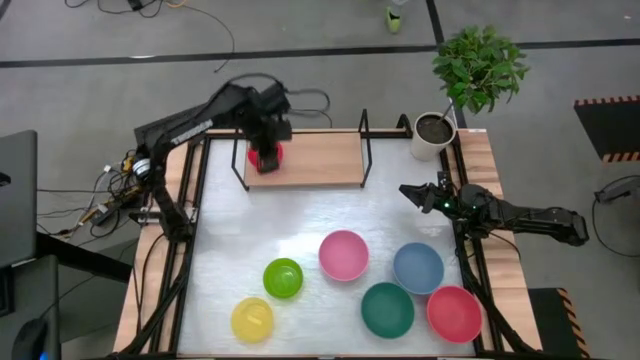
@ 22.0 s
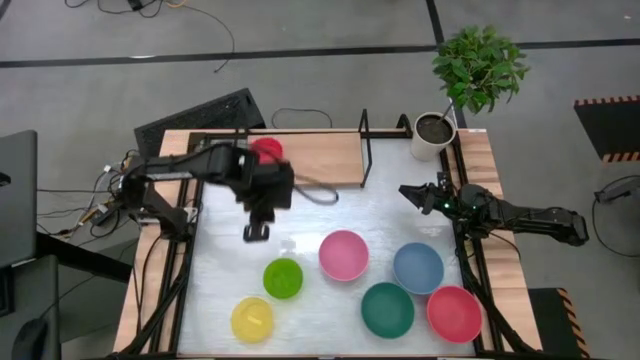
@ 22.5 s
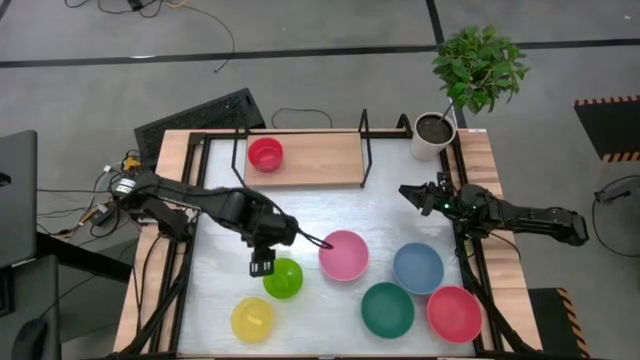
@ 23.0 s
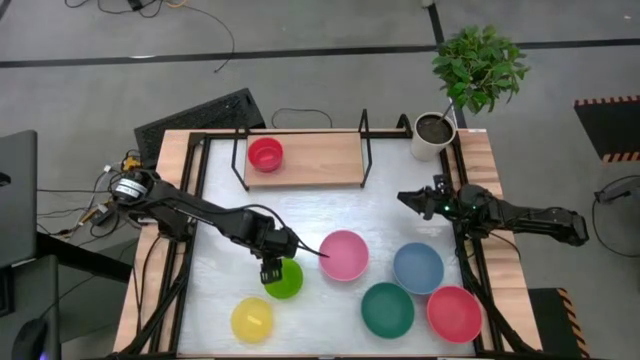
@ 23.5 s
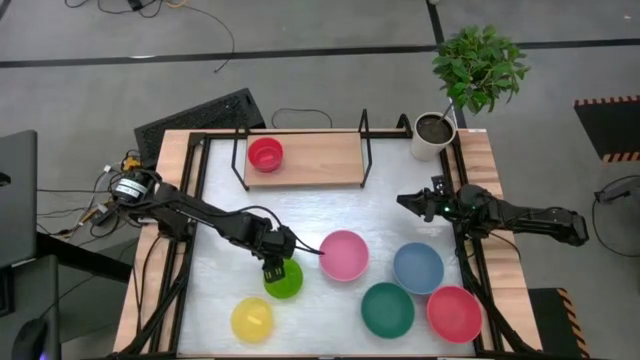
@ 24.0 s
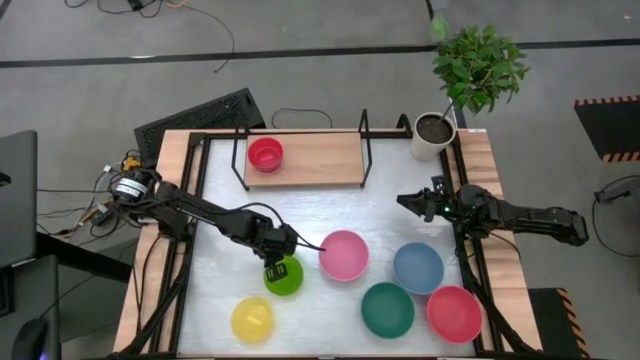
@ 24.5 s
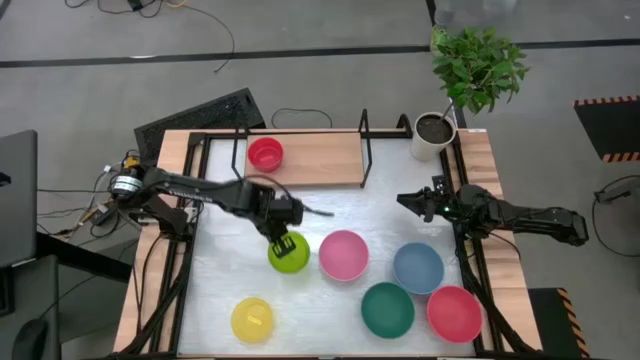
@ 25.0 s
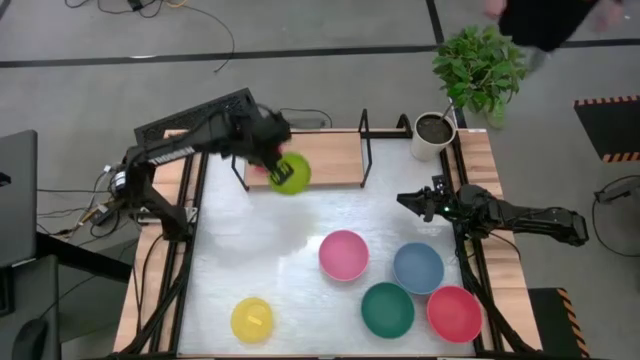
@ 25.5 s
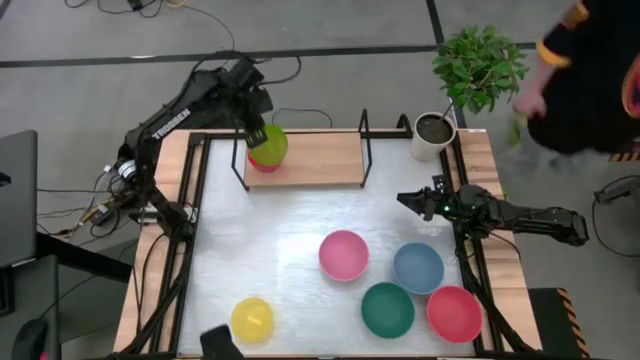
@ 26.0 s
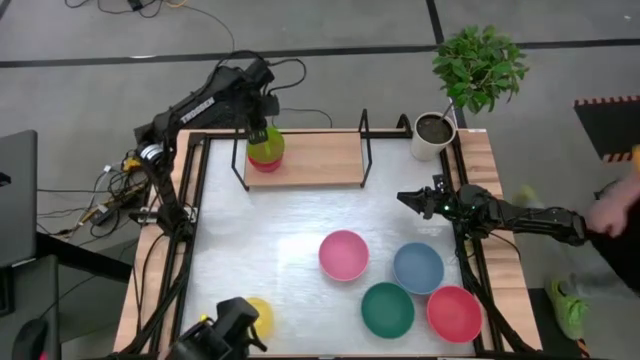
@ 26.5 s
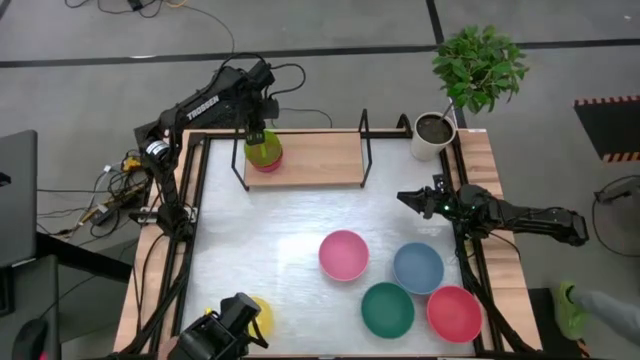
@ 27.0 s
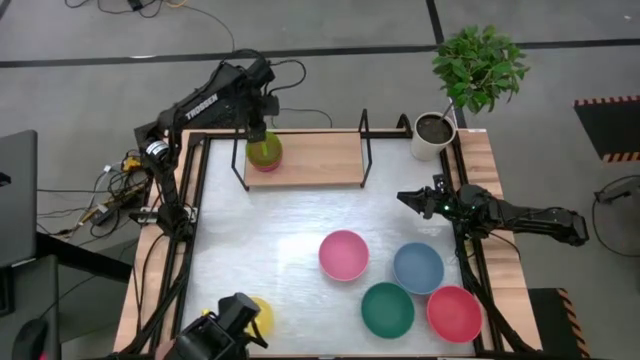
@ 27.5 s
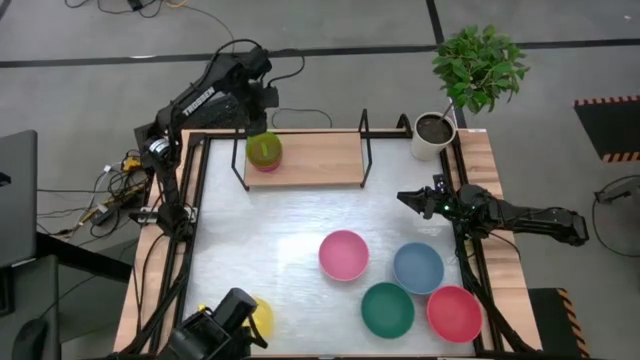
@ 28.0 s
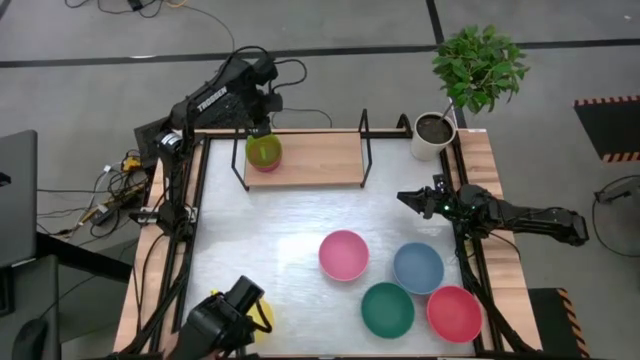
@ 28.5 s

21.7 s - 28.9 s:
Task: Place and stack bowls onto a shelf
Stack the green transparent bowl on top the orange transparent bowl on the shelf

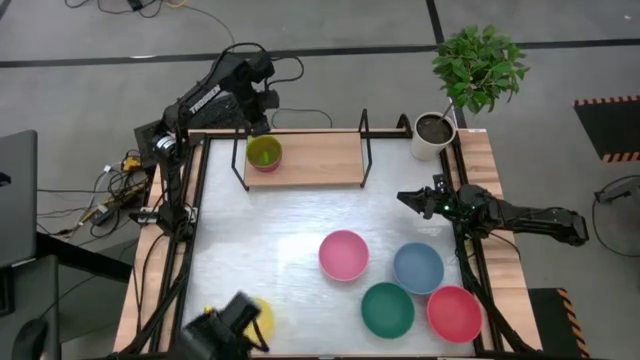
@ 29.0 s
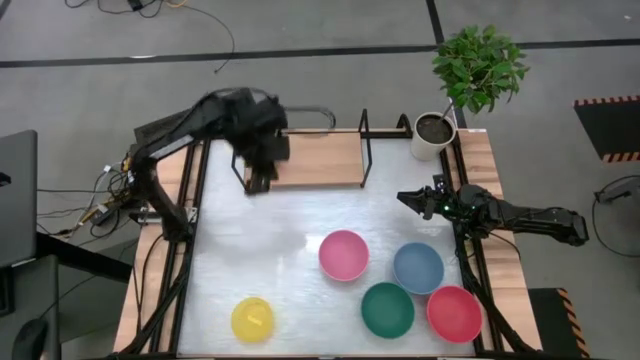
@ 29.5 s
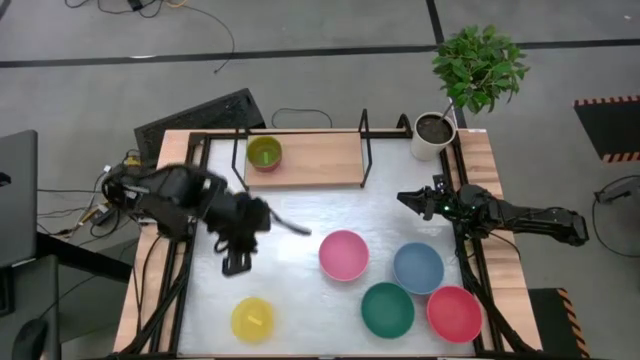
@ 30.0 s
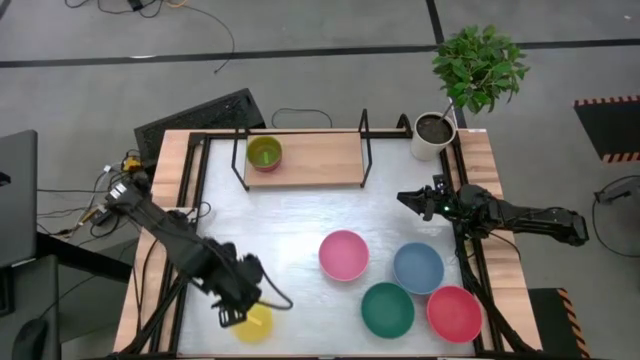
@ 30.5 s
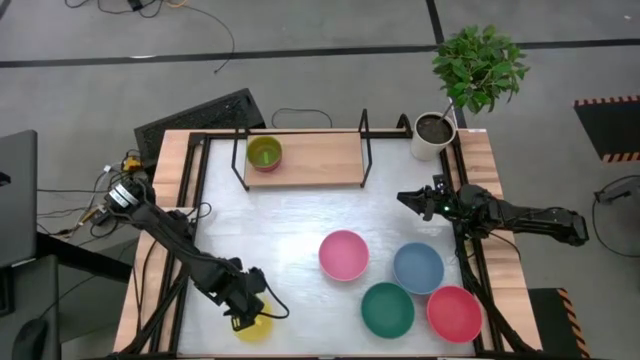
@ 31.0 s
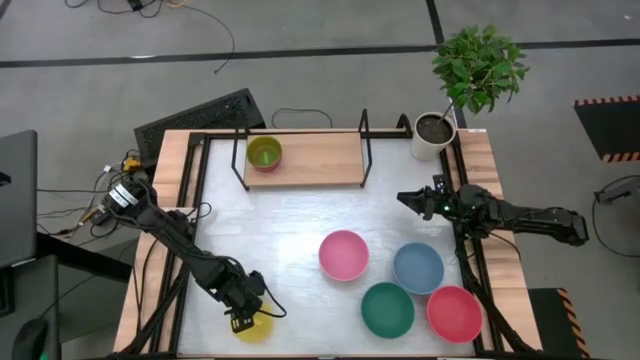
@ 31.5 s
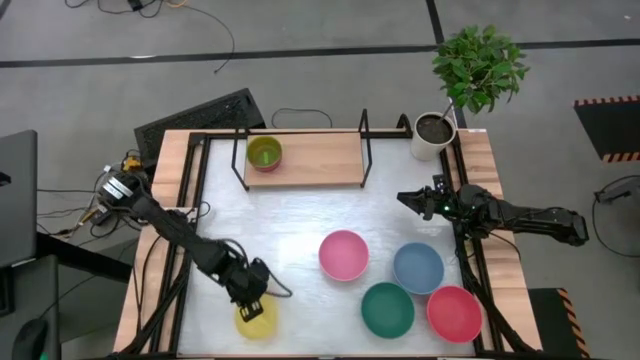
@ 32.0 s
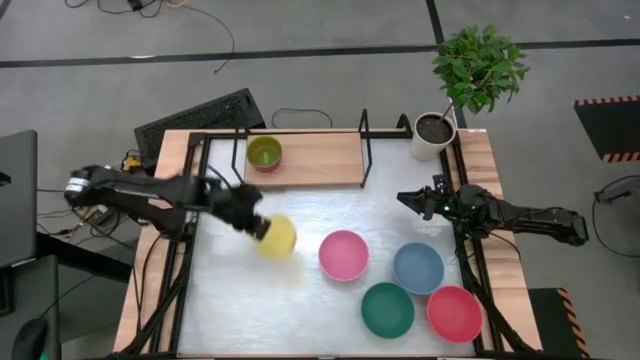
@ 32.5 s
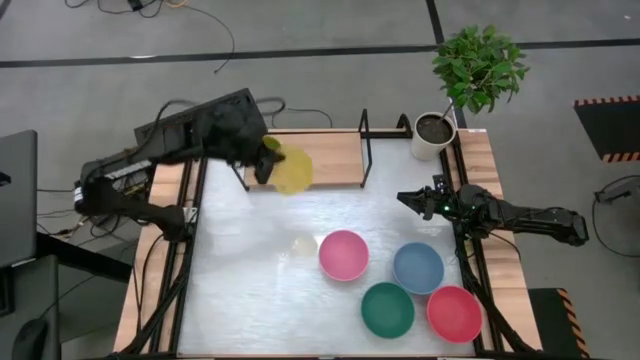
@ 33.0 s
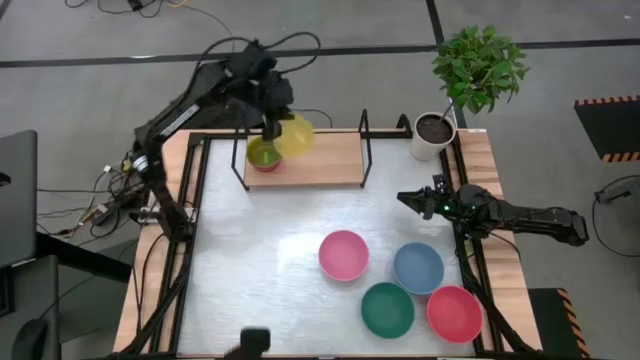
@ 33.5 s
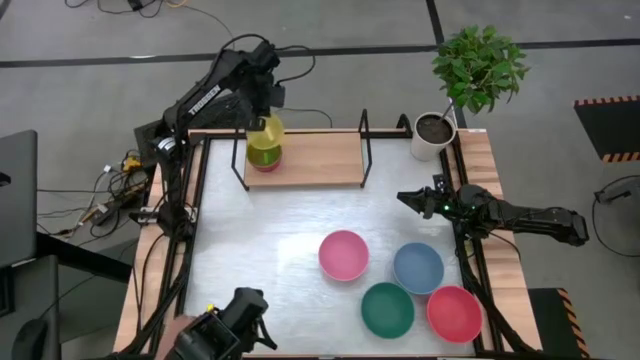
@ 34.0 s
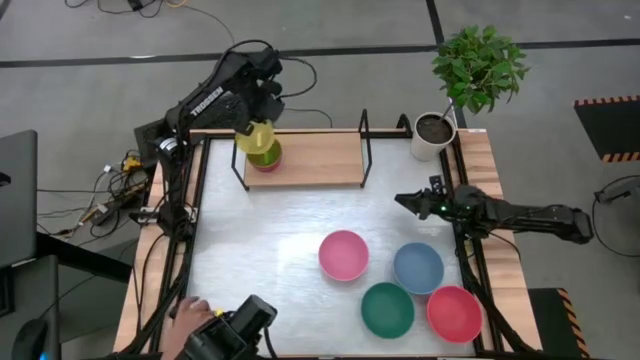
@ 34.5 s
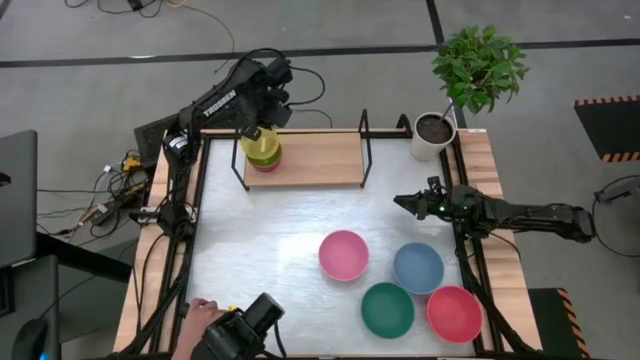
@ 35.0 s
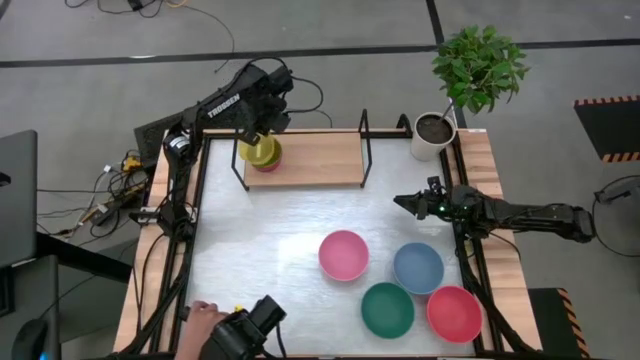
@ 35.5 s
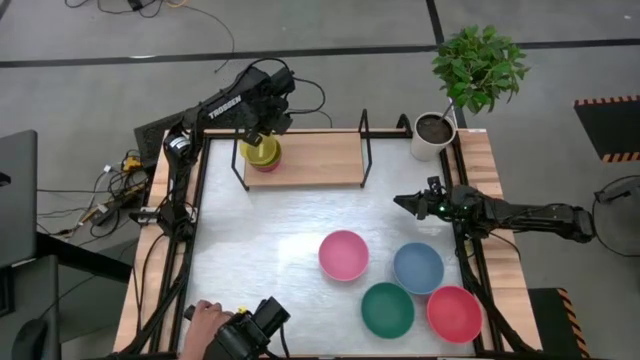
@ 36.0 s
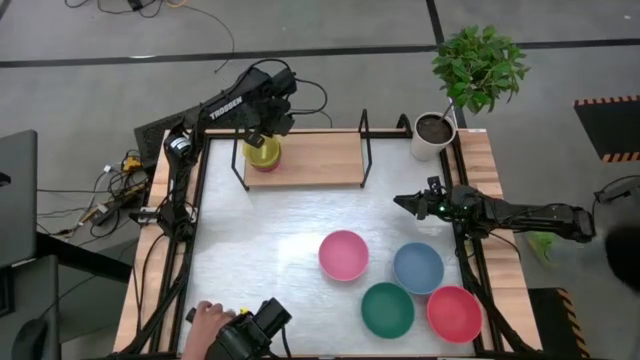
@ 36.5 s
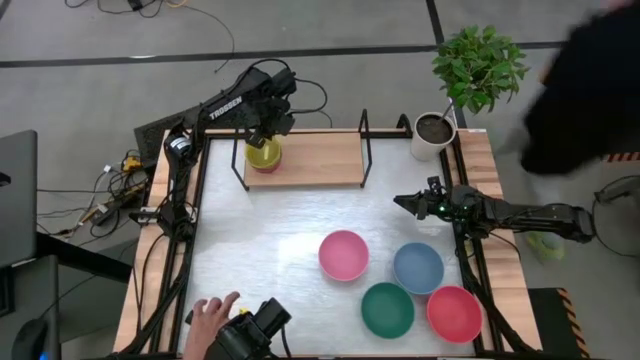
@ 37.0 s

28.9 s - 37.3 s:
Stack the yellow transparent bowl on top of the green transparent bowl into the shelf

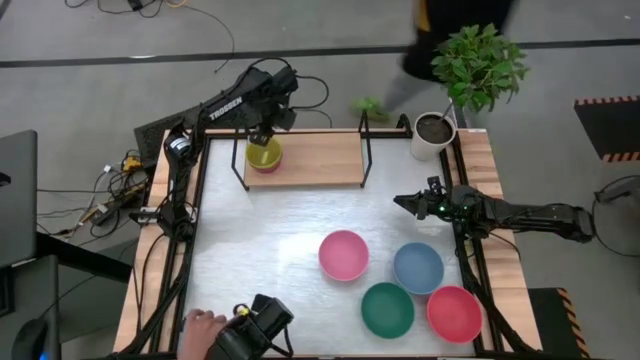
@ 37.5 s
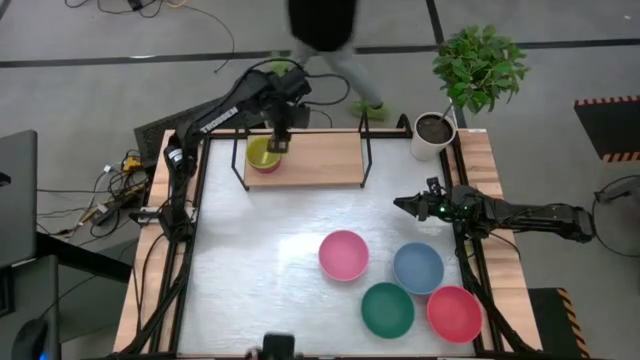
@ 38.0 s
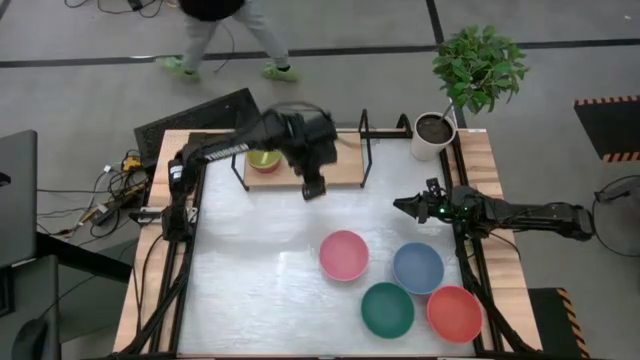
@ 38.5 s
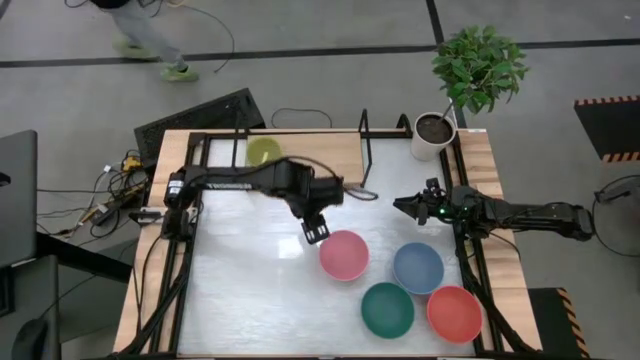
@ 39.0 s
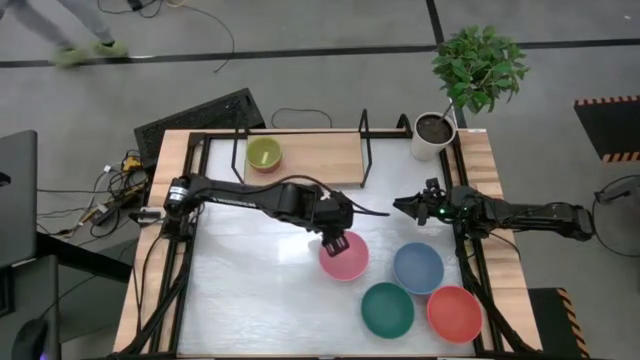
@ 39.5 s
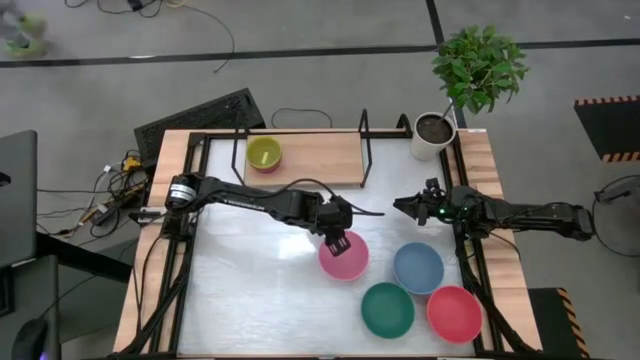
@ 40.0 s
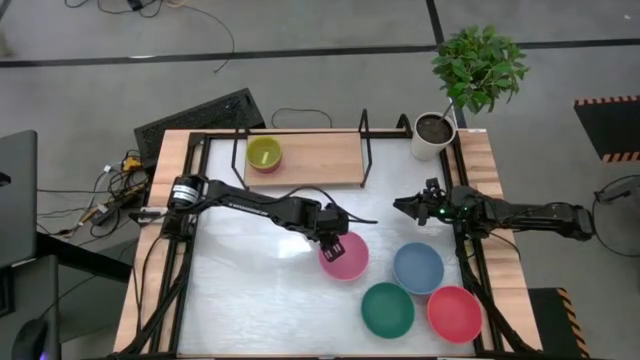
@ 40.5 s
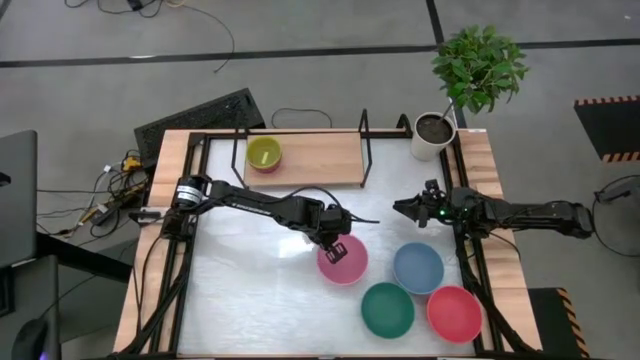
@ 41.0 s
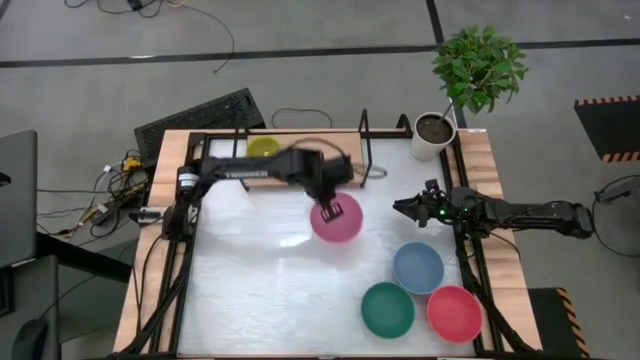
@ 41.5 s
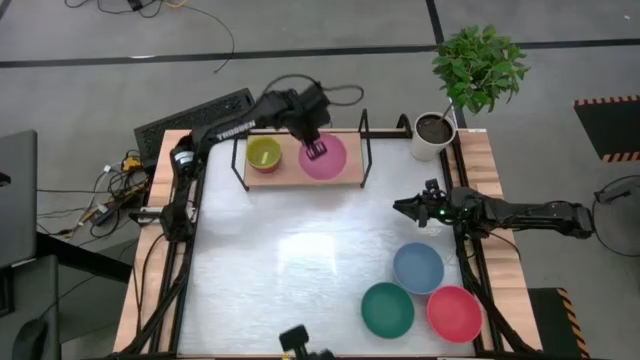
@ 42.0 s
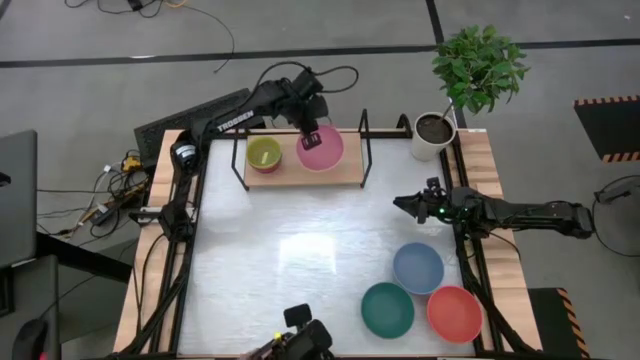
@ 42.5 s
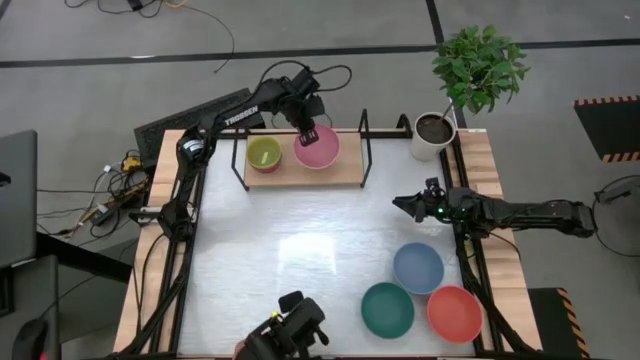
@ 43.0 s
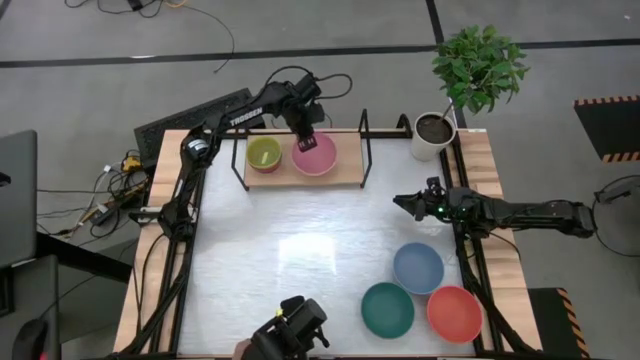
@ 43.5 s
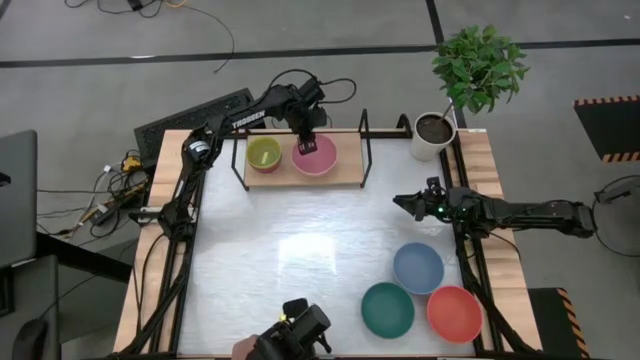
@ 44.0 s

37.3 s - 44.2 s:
Put the pink bowl on the shelf
